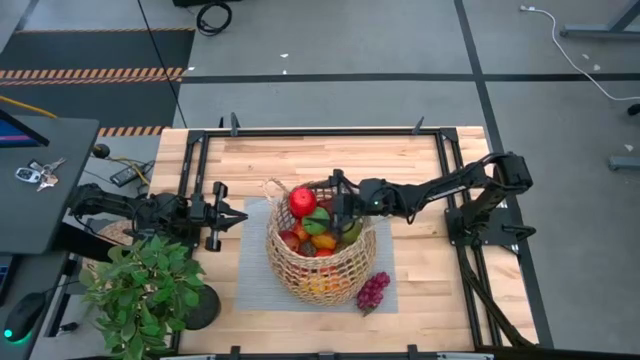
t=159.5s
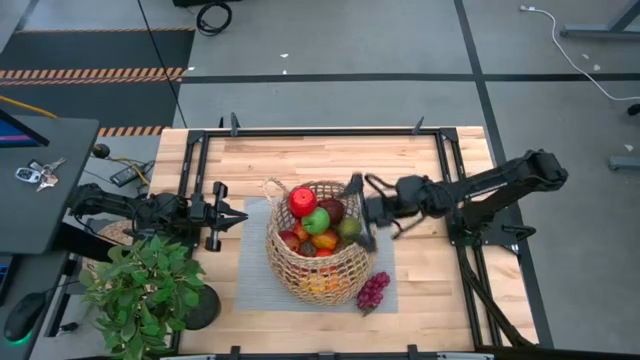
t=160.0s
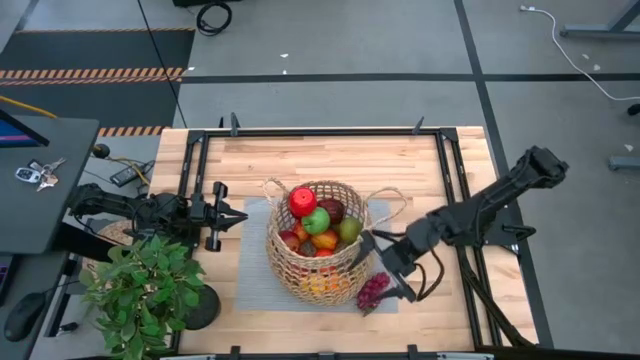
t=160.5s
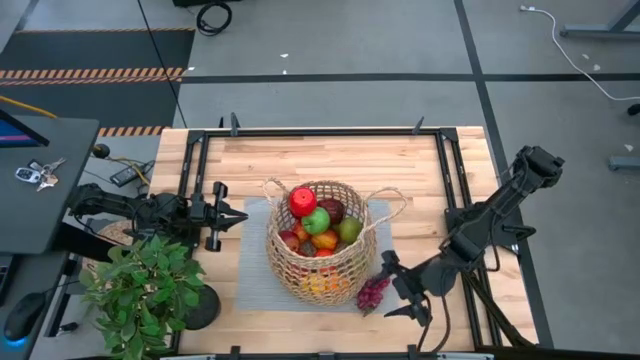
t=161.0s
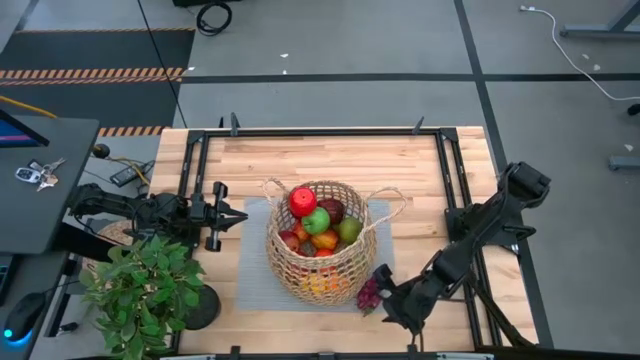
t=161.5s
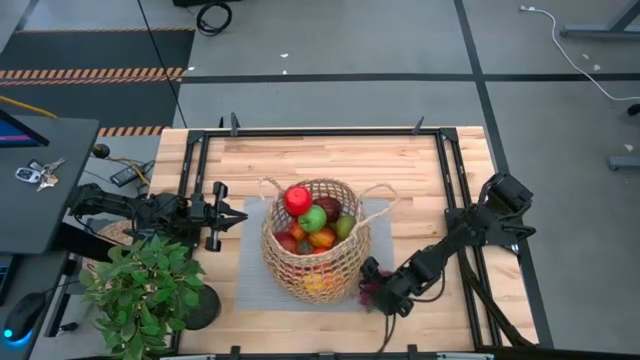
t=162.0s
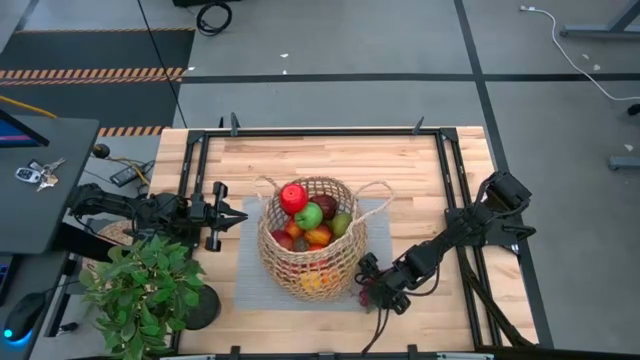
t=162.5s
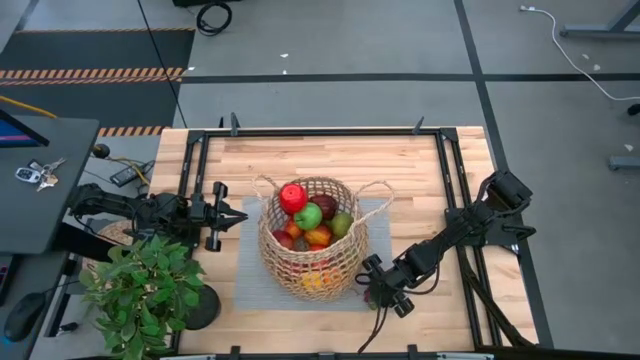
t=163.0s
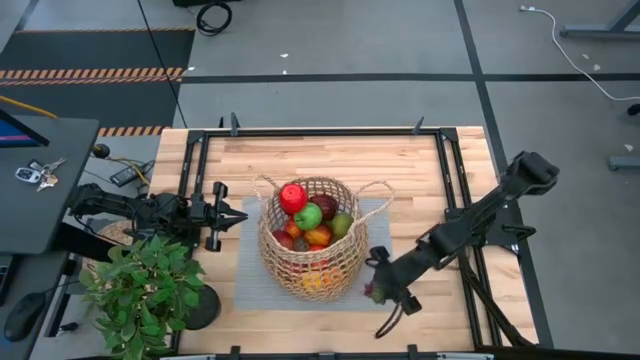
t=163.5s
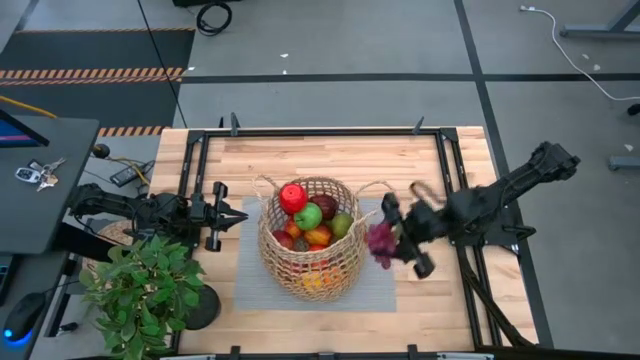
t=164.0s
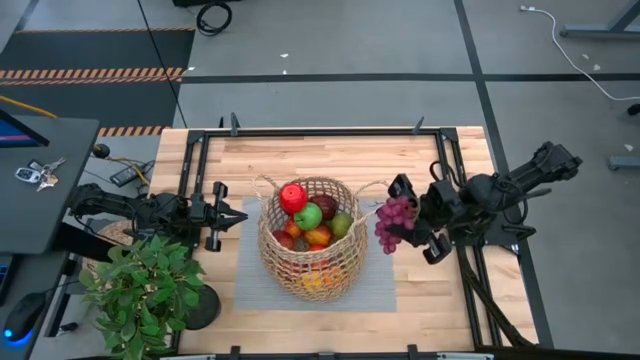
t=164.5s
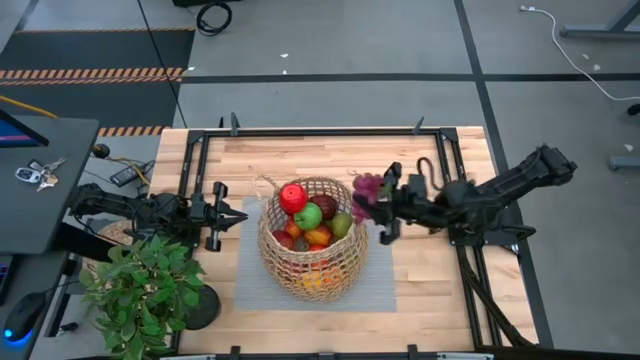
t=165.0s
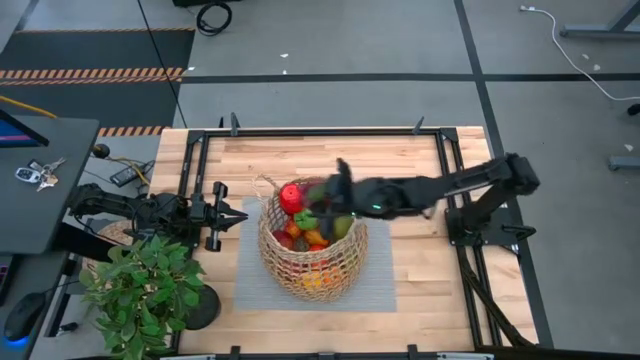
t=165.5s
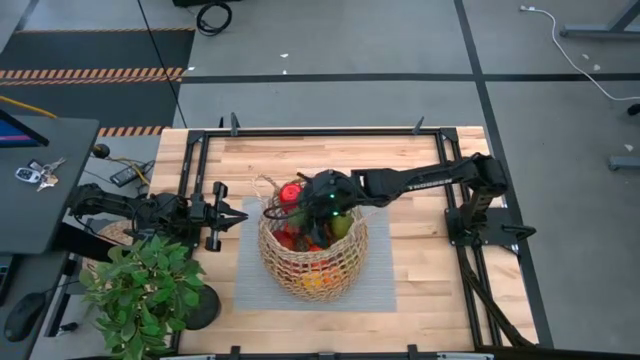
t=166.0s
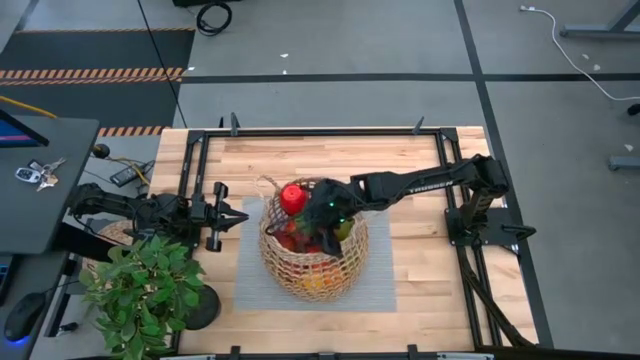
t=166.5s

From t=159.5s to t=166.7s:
Task: Build produce basket
Put the red grapes into the brown basket

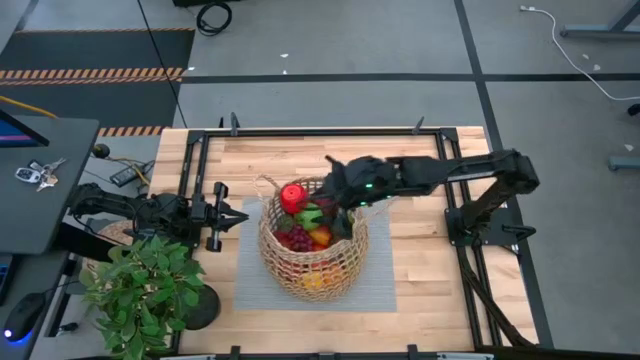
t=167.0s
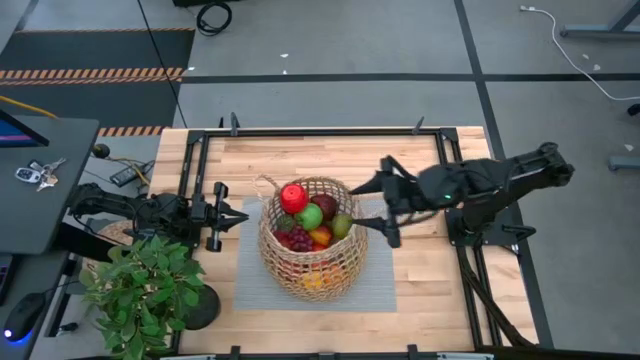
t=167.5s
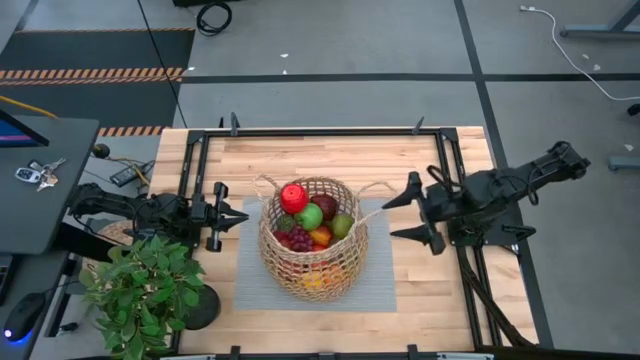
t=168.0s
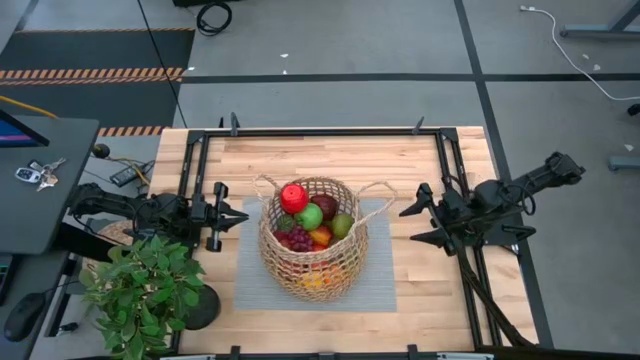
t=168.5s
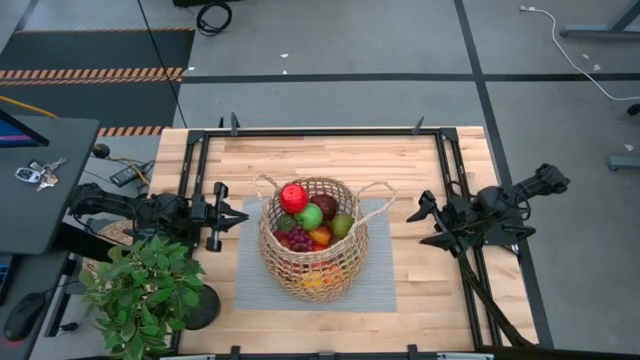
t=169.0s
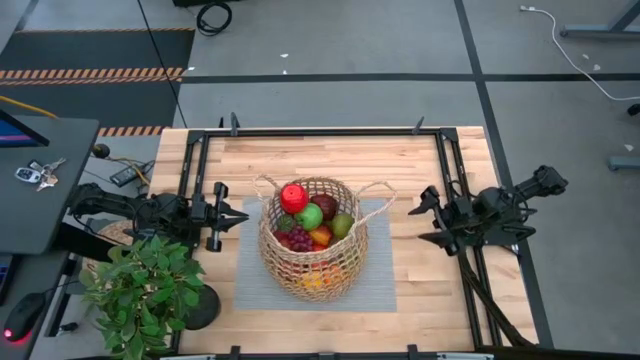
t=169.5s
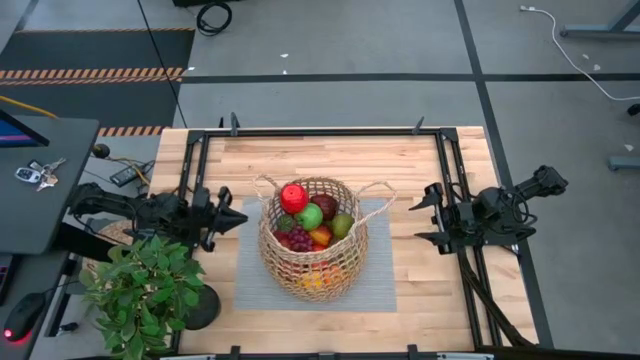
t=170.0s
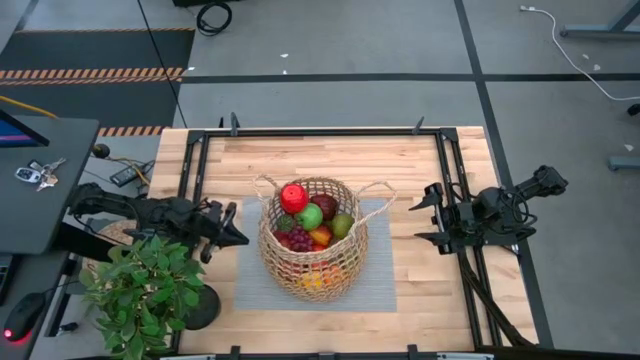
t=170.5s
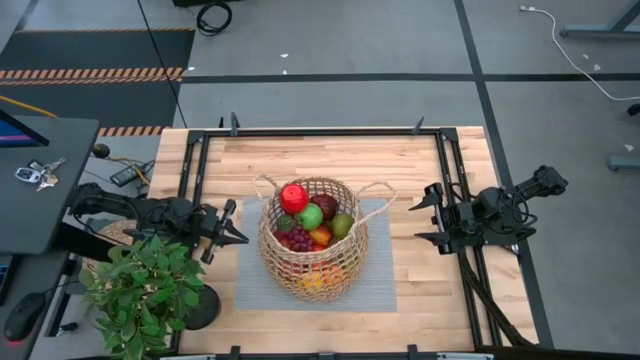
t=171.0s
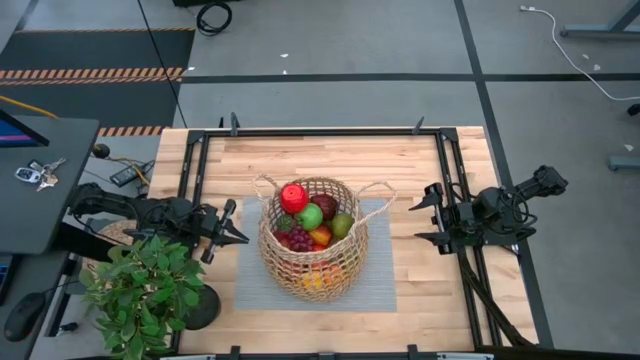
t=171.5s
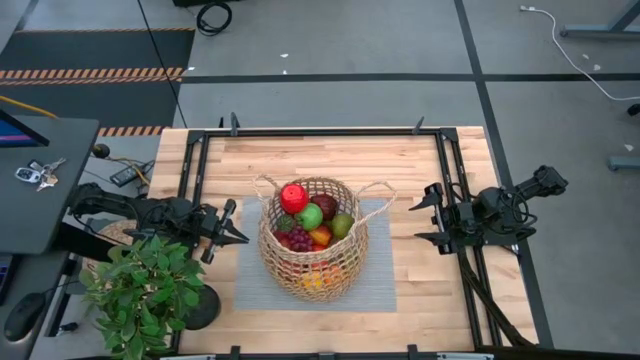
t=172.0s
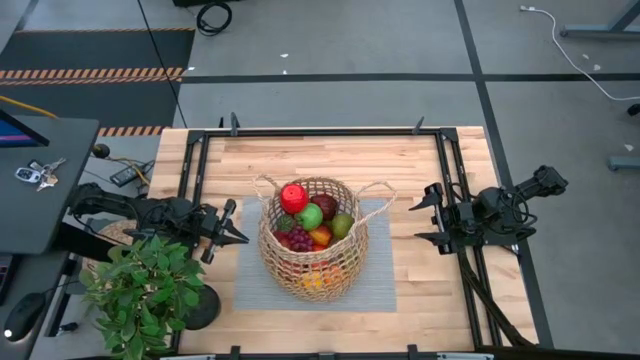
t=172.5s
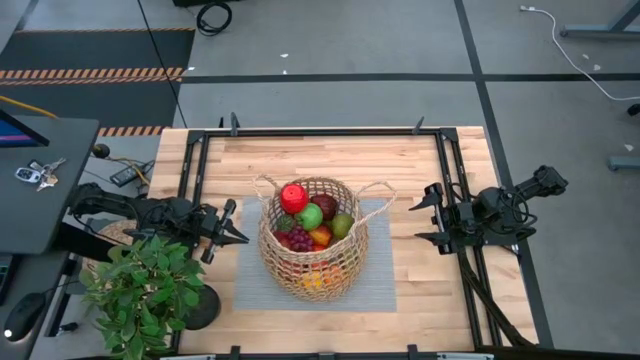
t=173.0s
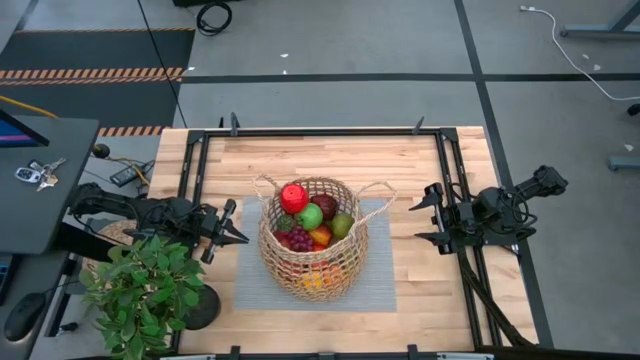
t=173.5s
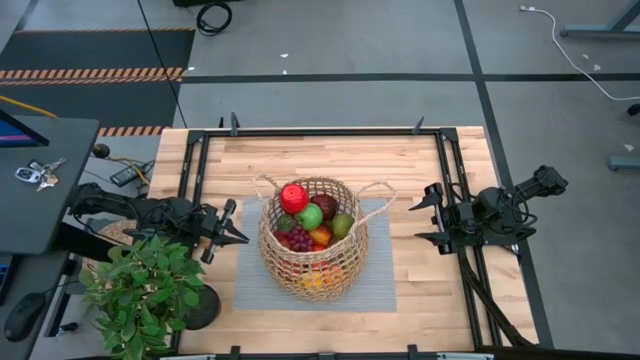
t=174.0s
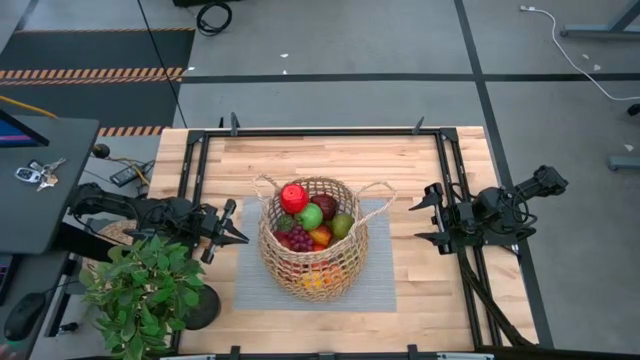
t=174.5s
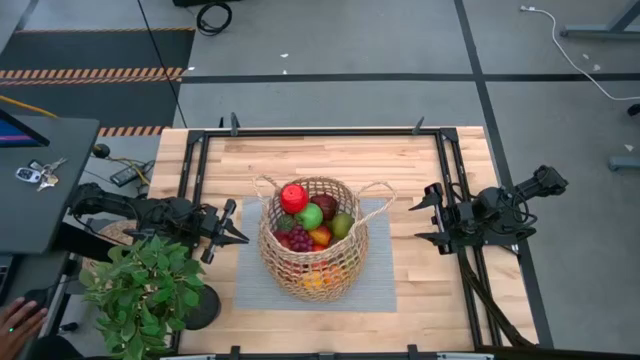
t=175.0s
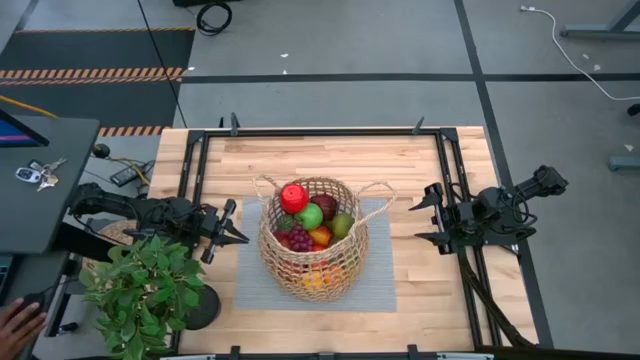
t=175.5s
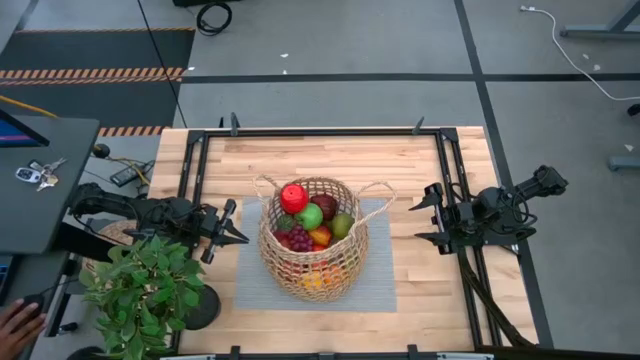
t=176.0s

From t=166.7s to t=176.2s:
Return to Home Position

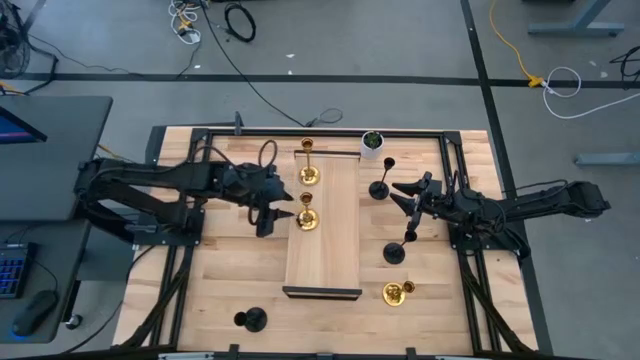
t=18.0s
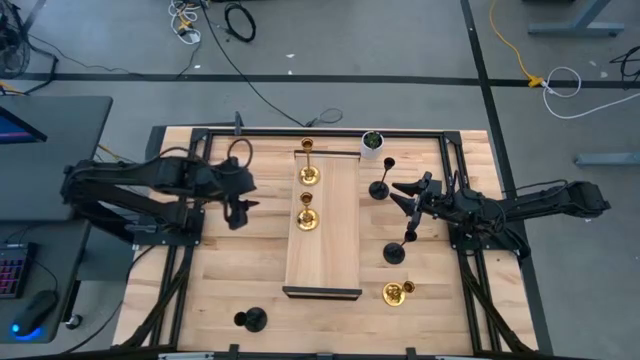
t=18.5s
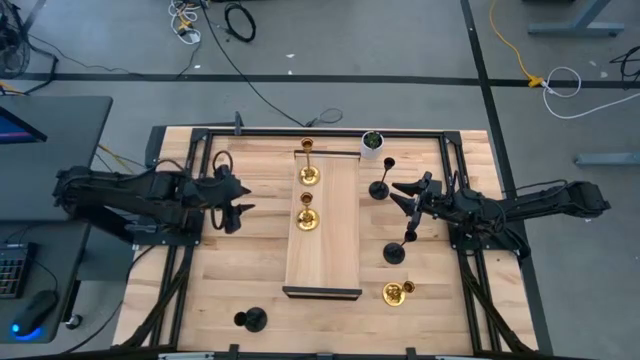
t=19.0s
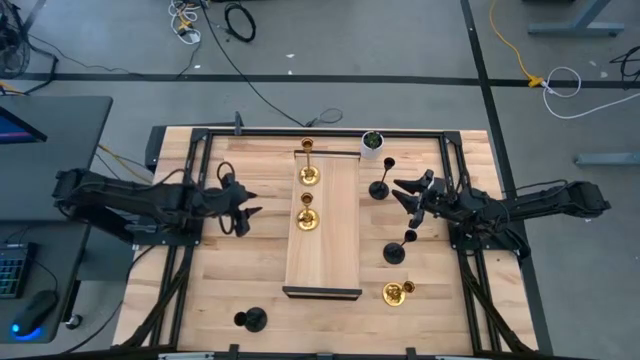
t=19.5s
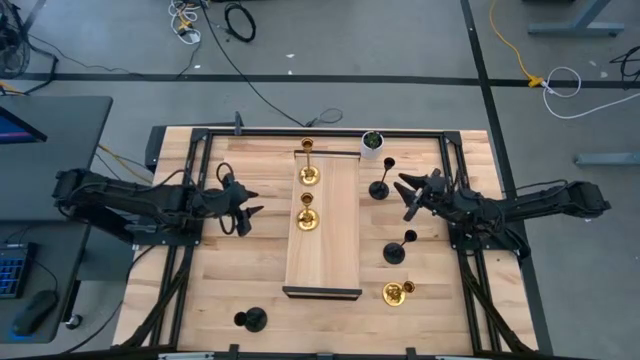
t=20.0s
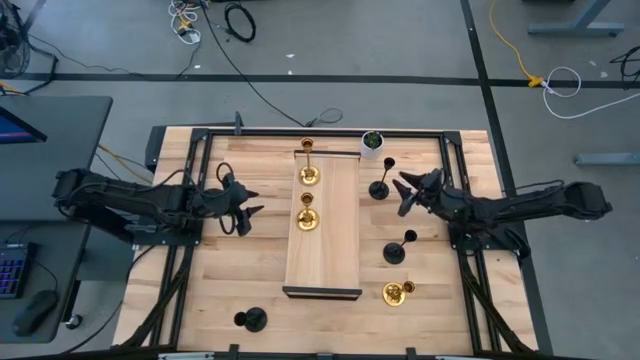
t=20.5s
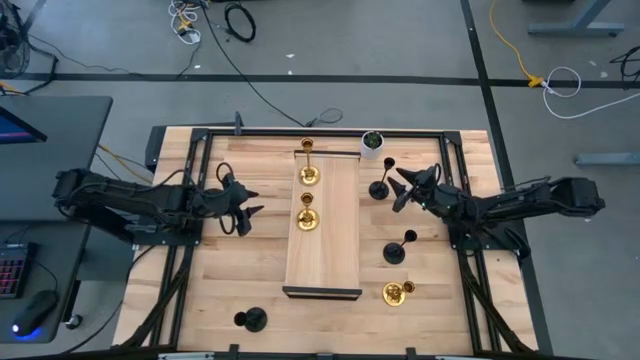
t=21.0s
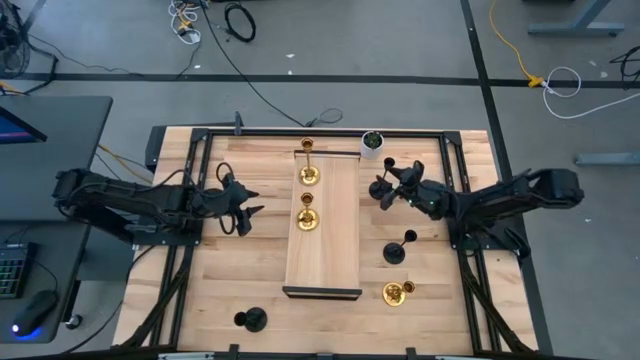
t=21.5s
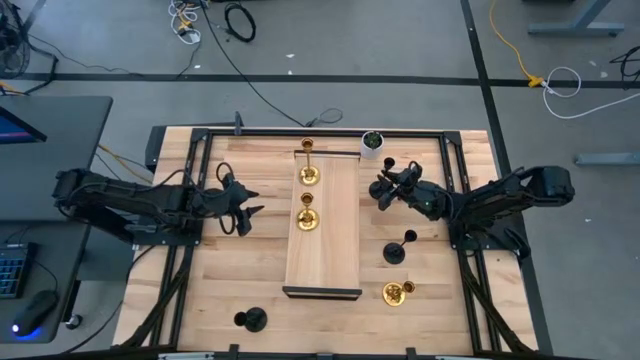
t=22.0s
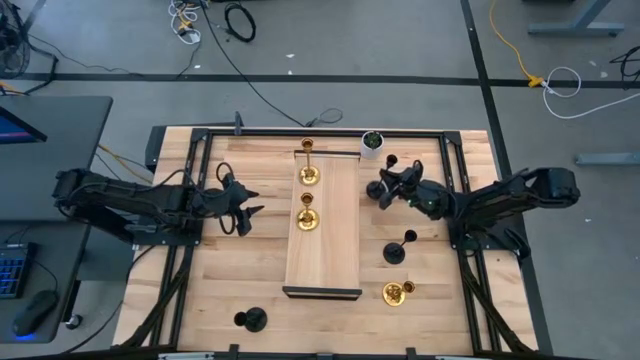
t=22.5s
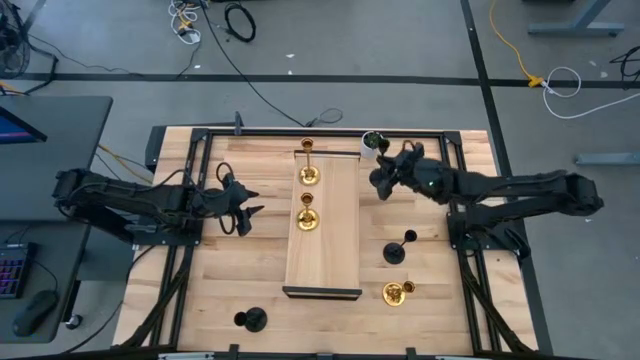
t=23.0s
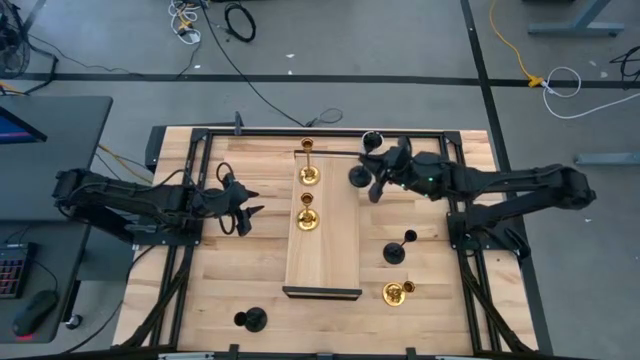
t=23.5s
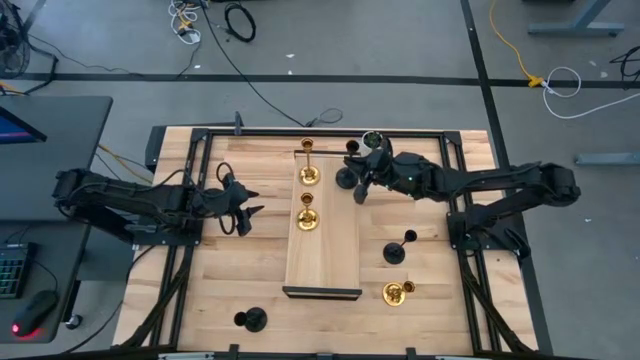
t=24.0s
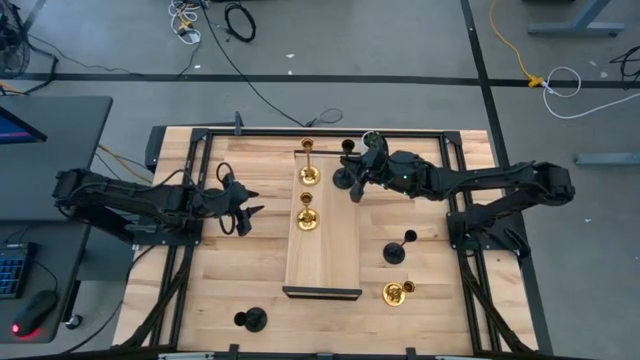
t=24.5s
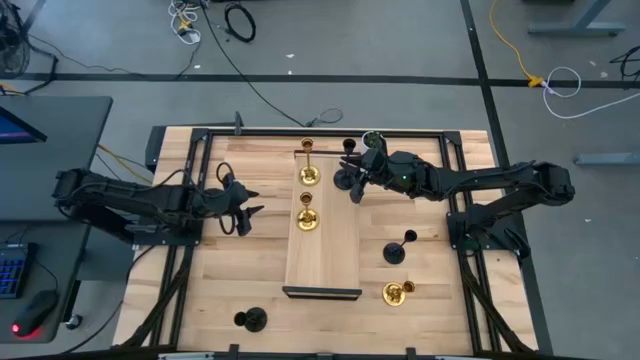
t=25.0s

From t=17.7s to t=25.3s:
Task: Pick & Place candle stick holders
Put the top black candle holder on the shelf
